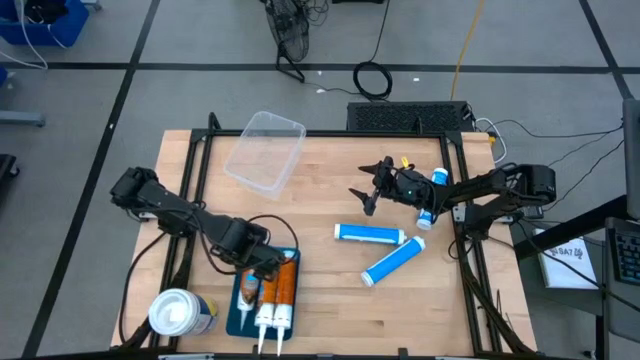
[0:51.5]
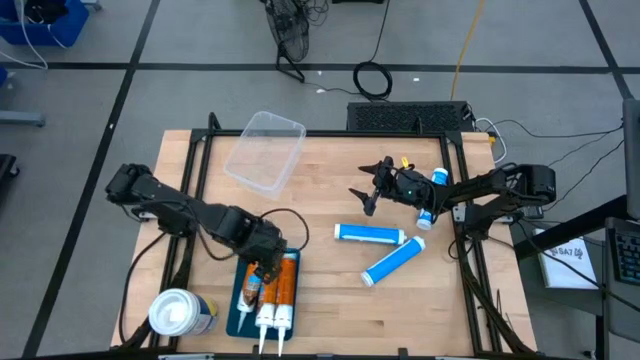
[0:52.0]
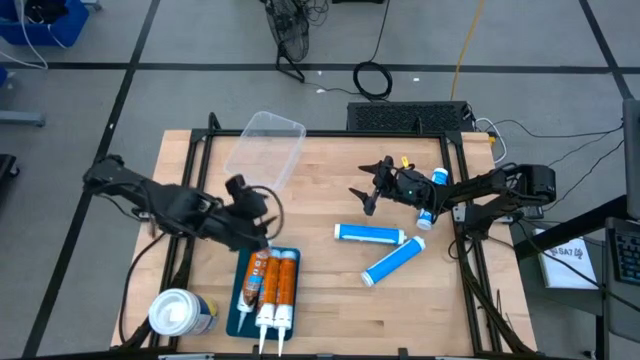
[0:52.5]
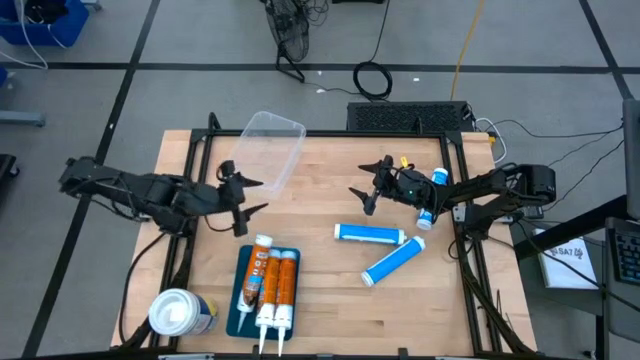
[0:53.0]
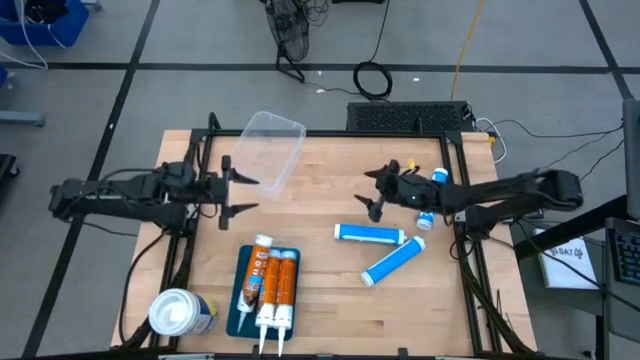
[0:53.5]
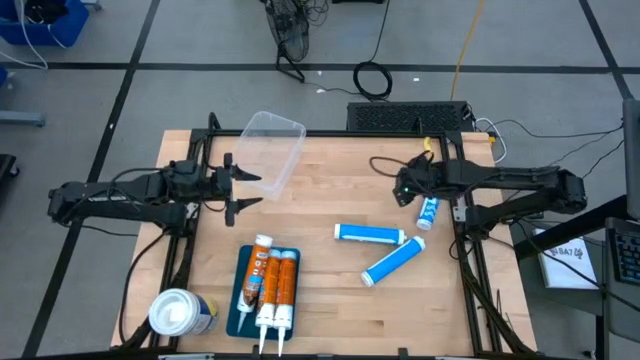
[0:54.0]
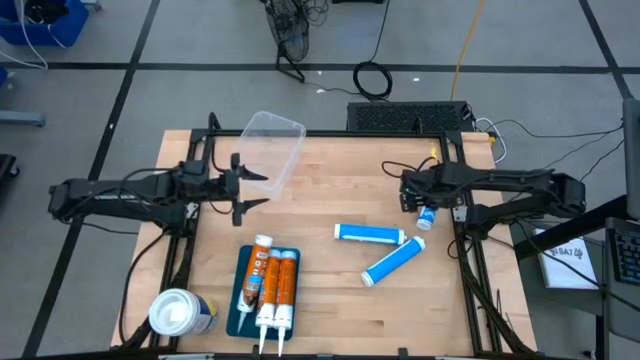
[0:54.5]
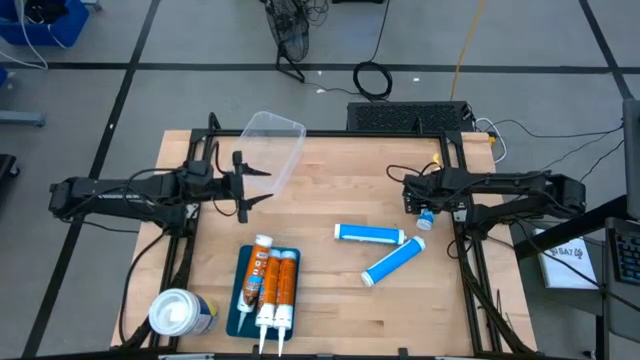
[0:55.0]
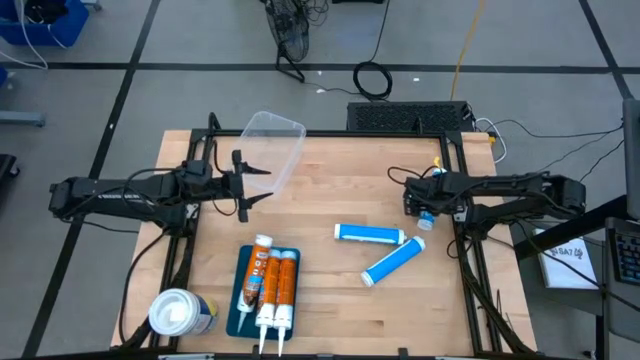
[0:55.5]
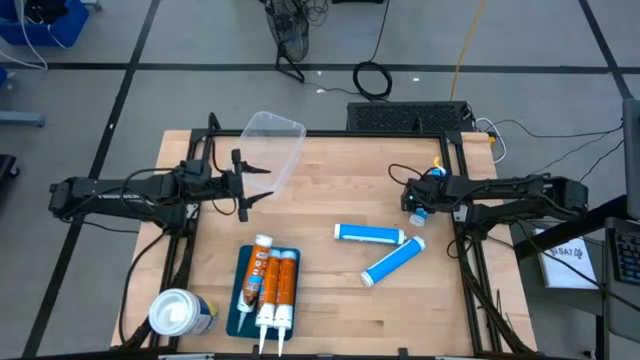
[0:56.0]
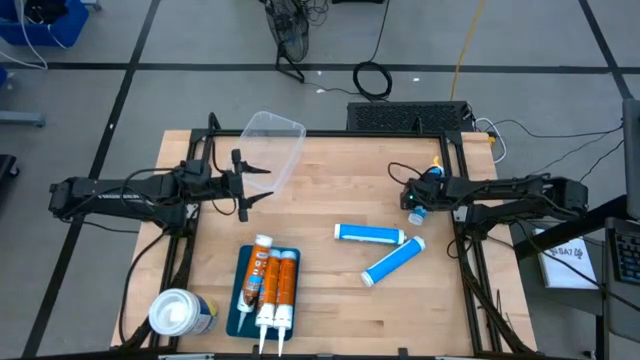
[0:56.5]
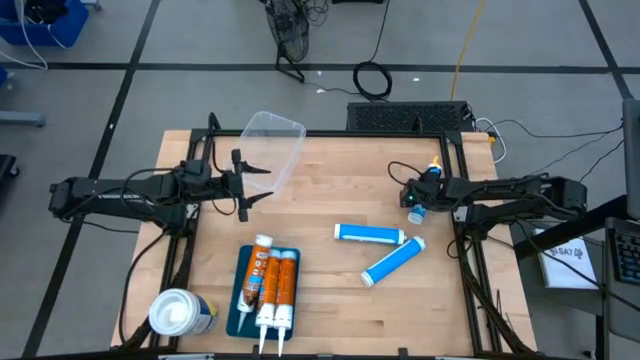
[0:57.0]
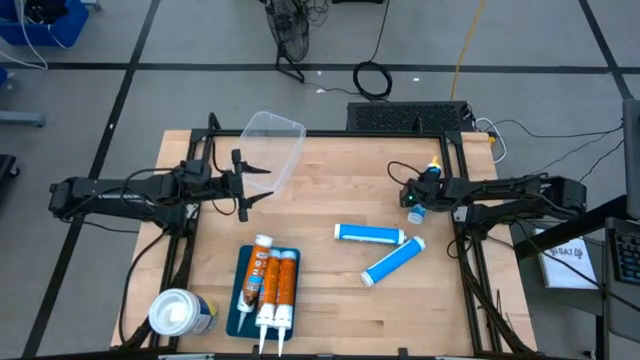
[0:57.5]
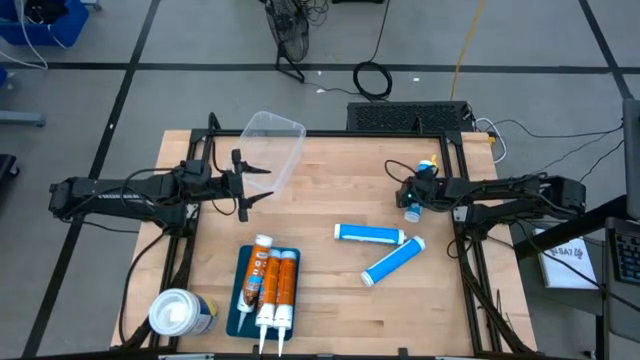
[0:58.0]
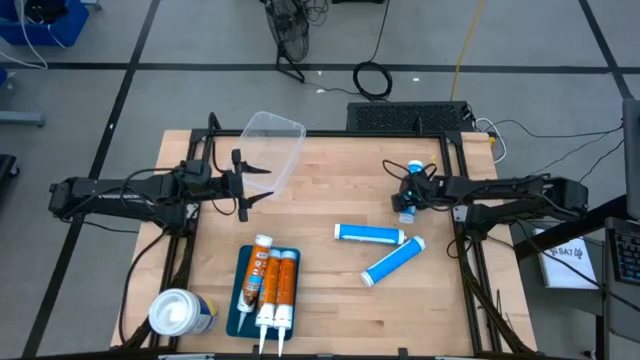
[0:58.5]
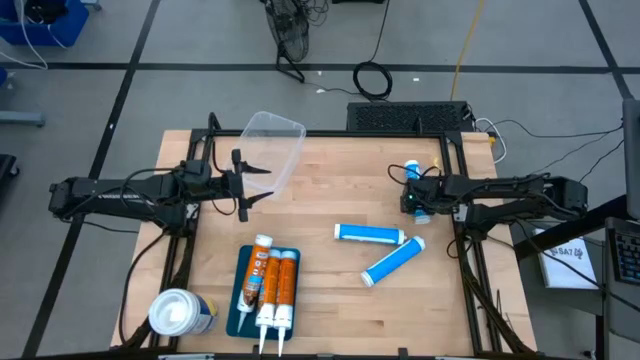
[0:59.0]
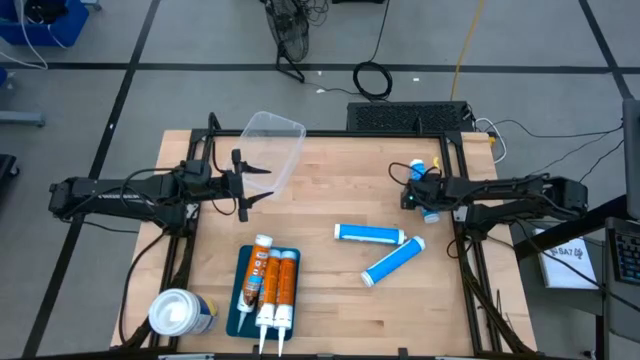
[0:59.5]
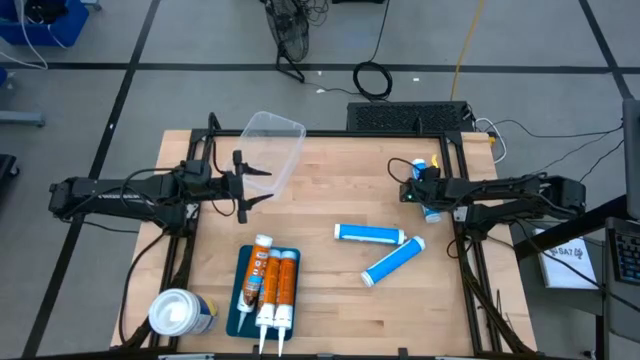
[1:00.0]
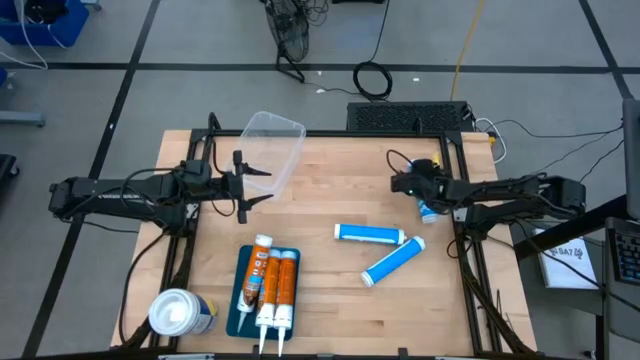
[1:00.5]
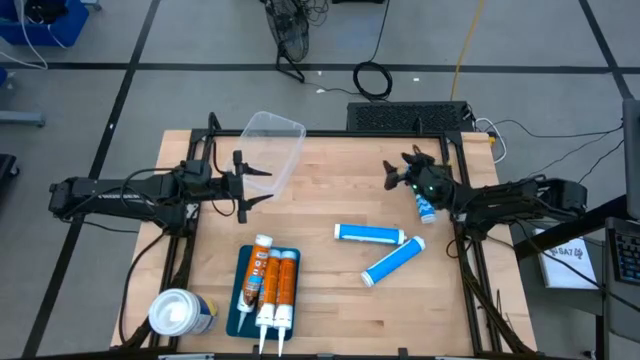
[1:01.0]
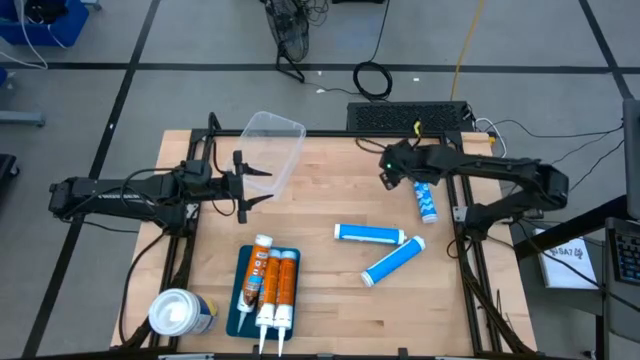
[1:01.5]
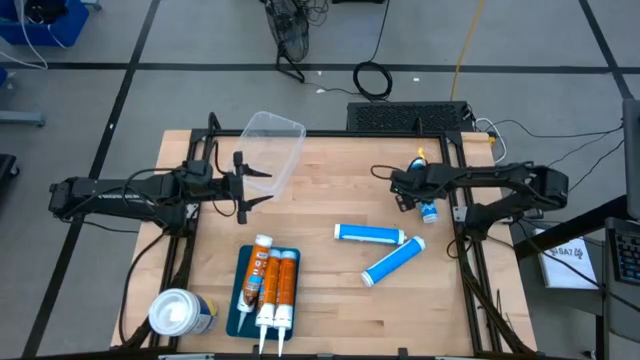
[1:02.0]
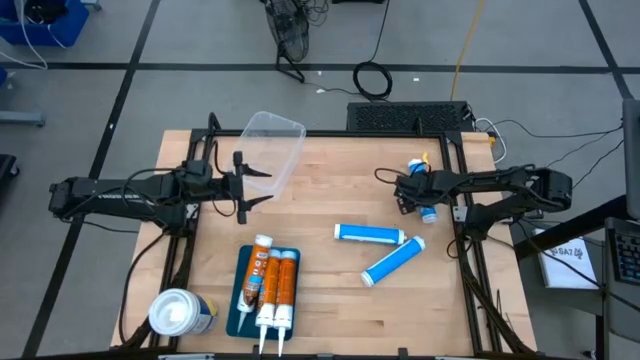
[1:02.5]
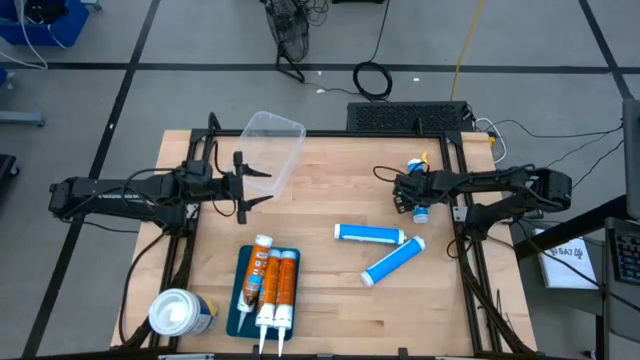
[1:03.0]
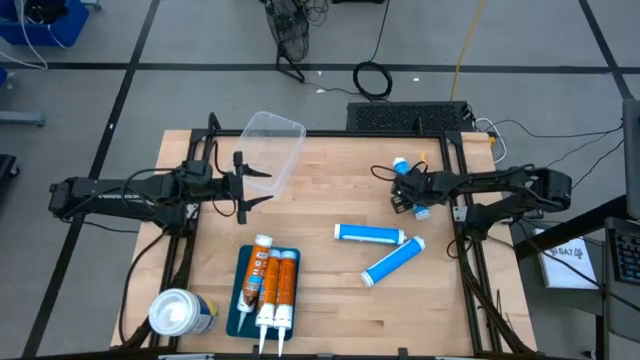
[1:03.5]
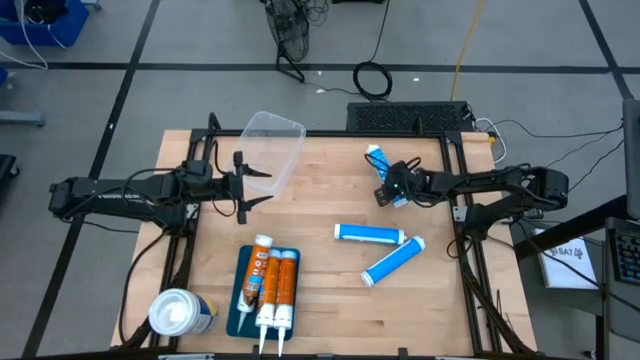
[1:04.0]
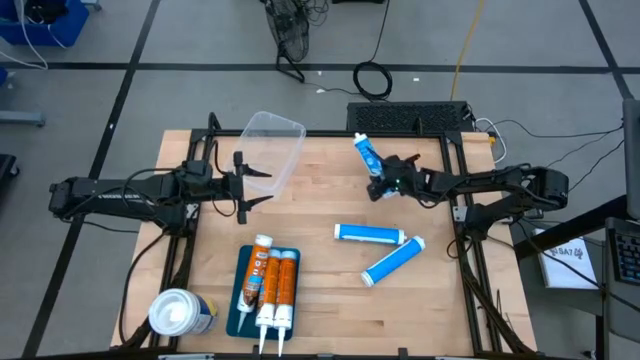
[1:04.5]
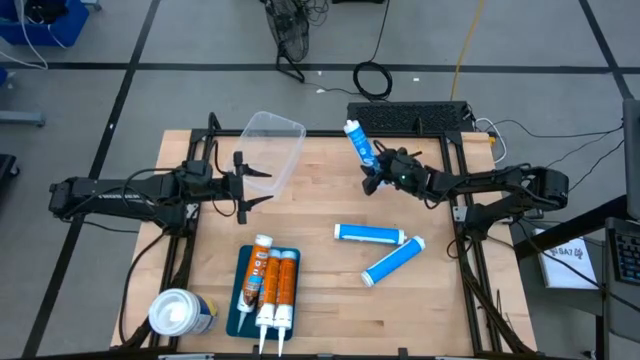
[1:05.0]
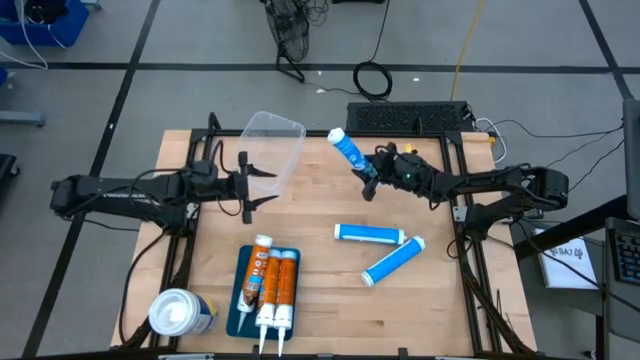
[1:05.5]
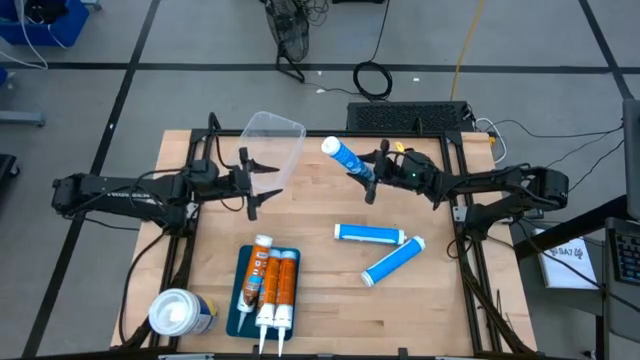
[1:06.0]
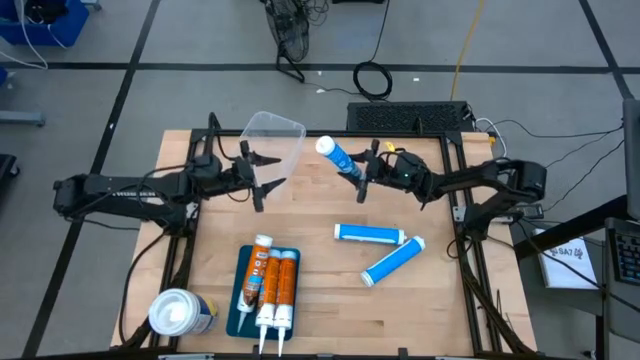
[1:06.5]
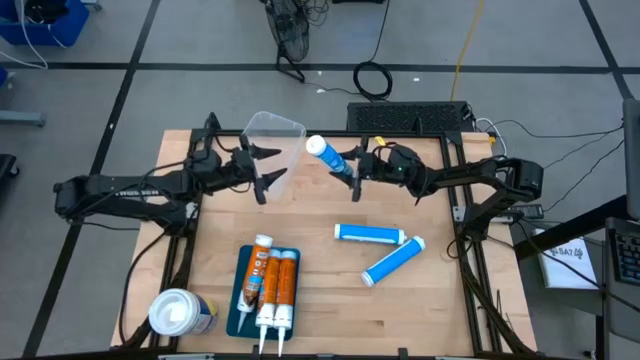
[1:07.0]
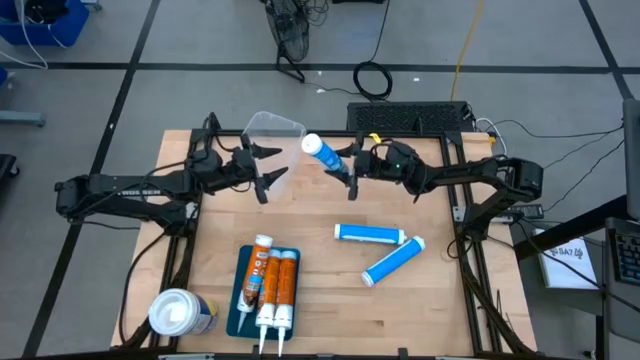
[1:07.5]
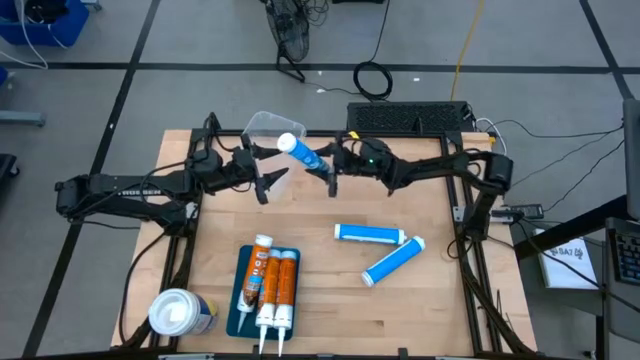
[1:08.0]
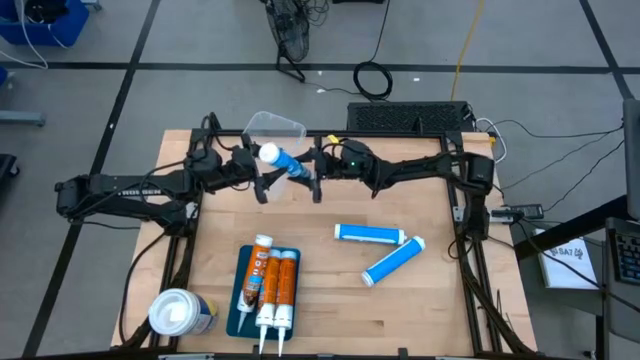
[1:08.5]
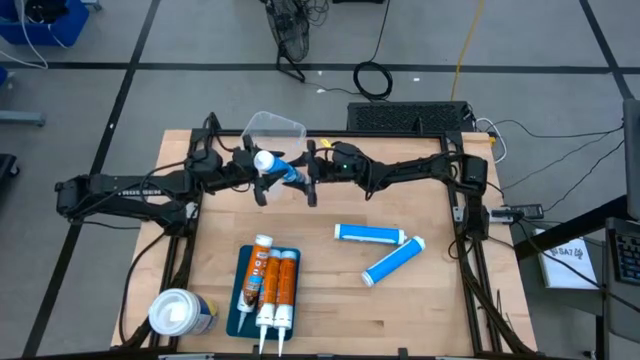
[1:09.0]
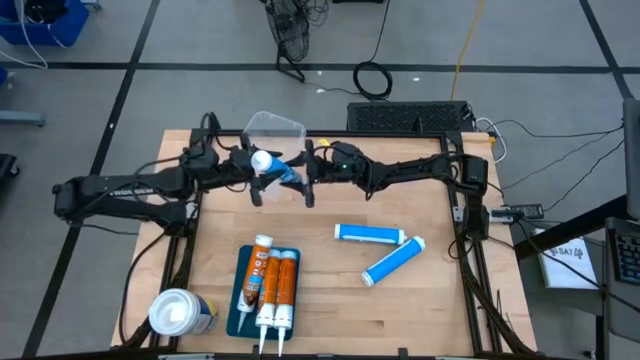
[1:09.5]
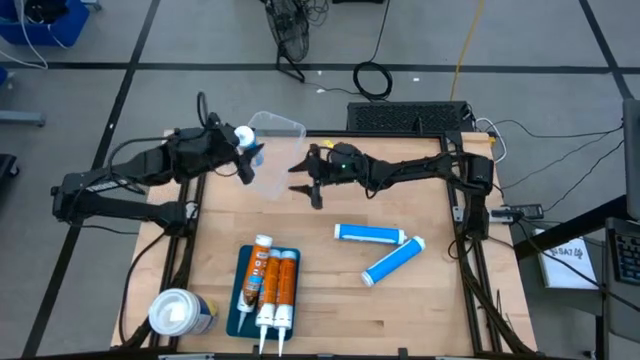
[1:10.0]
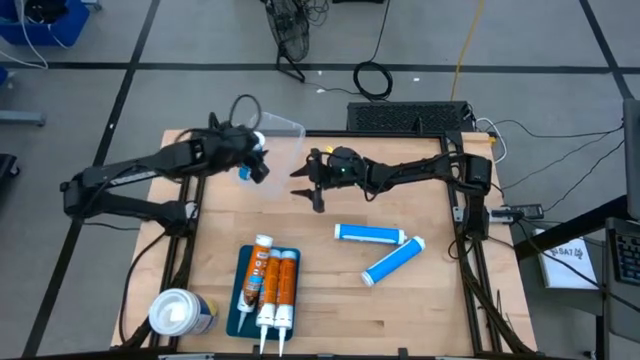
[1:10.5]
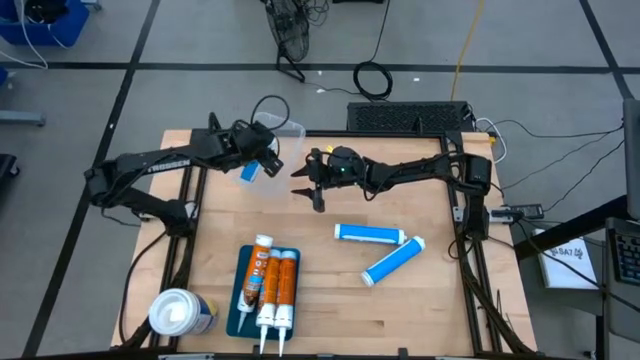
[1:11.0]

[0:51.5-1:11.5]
Task: Pick & place silicon tubes, Sealant and Lysol wipes
Put the top blue sealant into the white bin

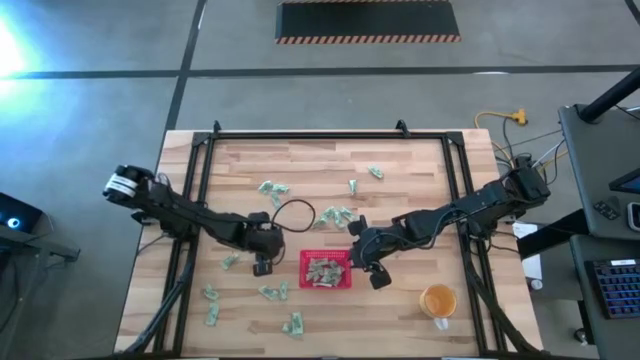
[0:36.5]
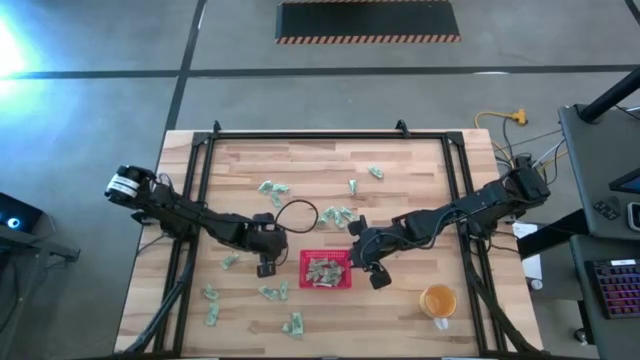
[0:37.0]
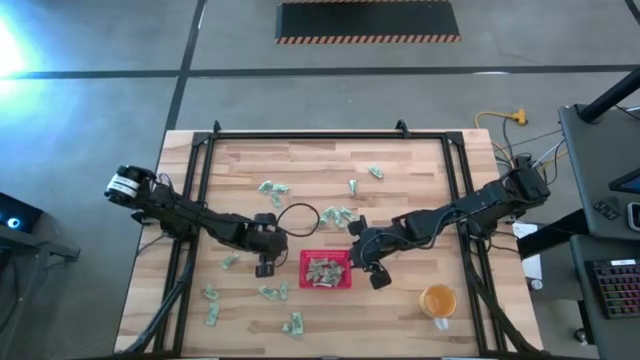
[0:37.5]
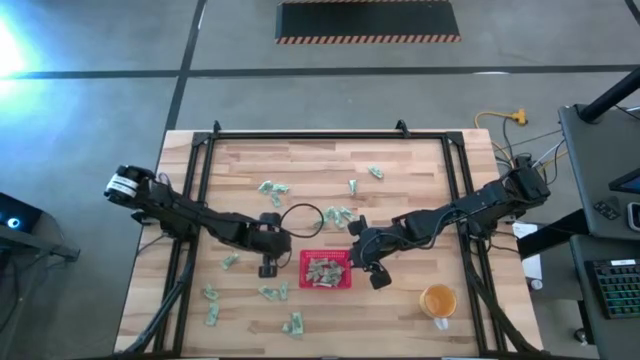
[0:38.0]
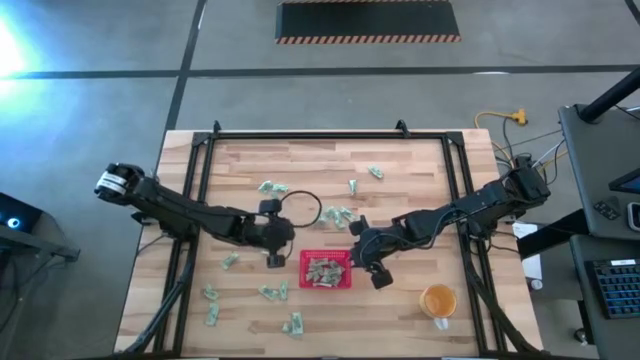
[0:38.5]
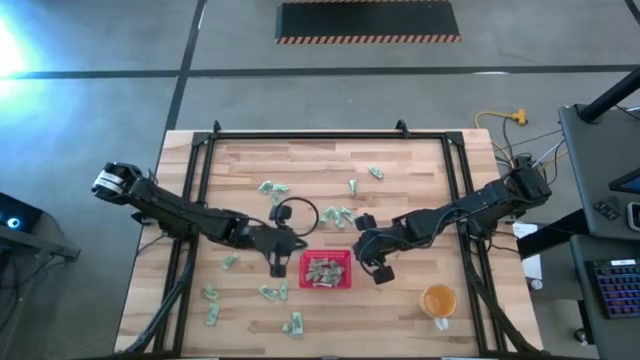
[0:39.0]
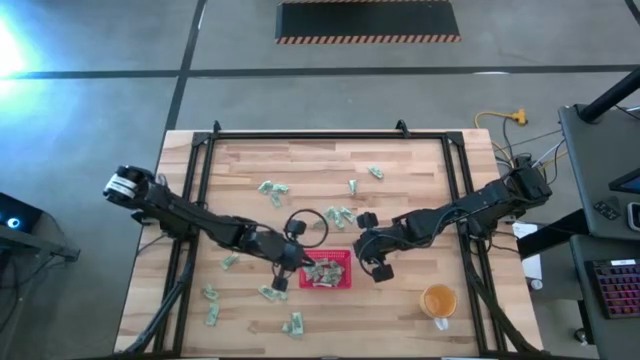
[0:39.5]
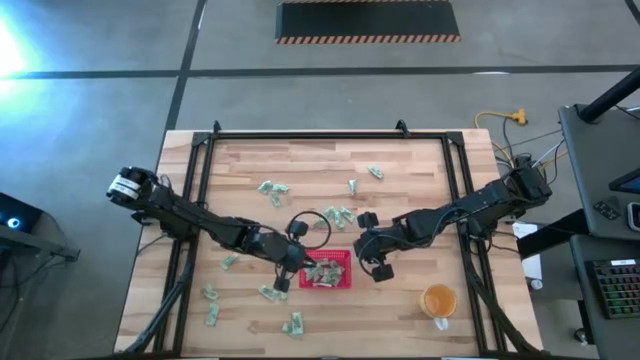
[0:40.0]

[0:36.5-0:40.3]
Task: Pick and place Stevia / Truvia into bins
Put the white stevia packet into the red bin
